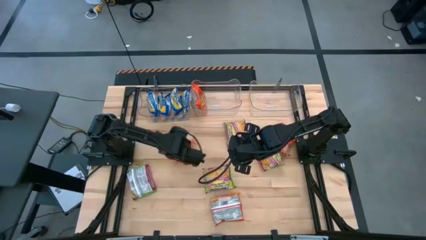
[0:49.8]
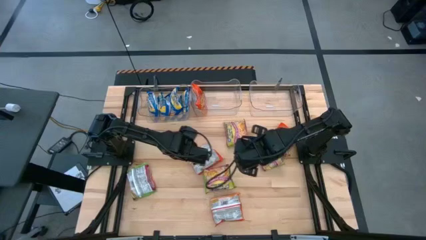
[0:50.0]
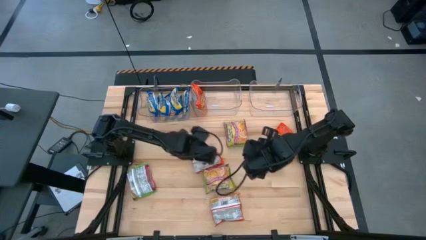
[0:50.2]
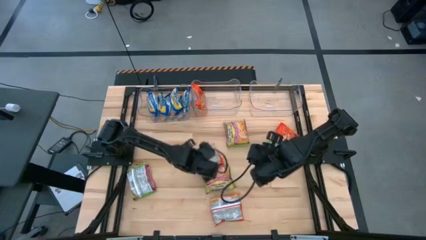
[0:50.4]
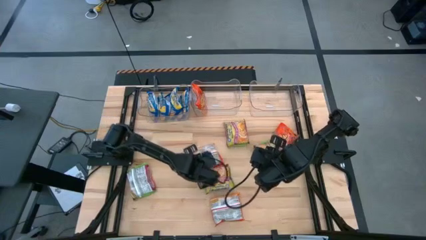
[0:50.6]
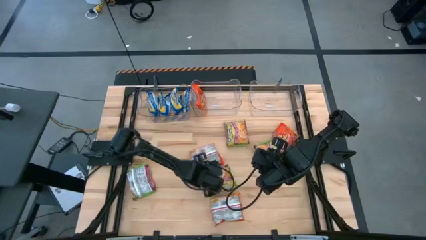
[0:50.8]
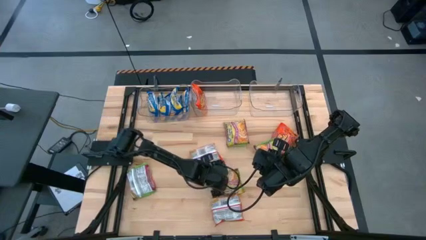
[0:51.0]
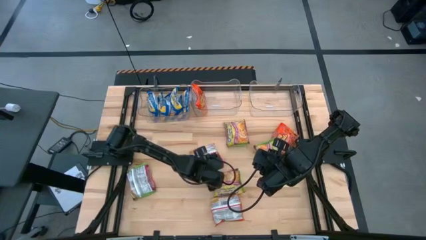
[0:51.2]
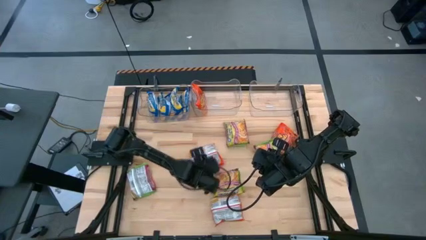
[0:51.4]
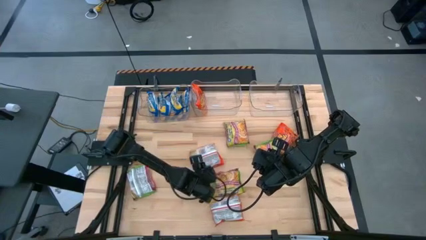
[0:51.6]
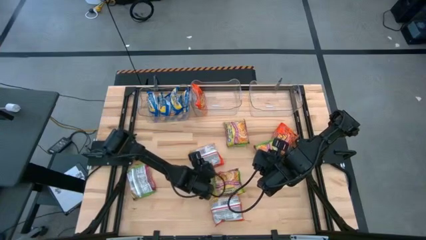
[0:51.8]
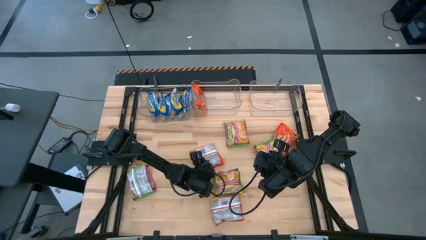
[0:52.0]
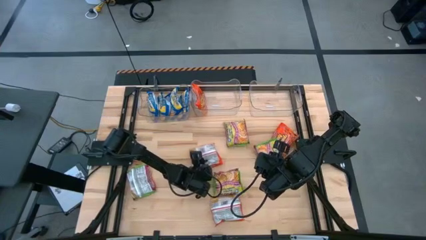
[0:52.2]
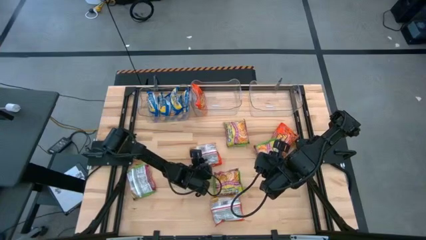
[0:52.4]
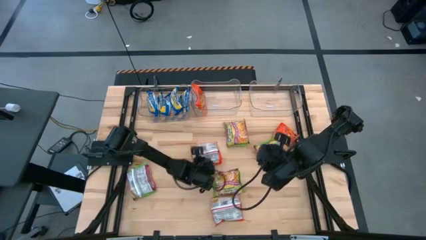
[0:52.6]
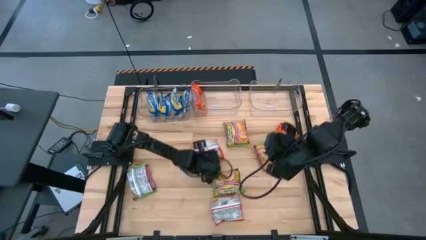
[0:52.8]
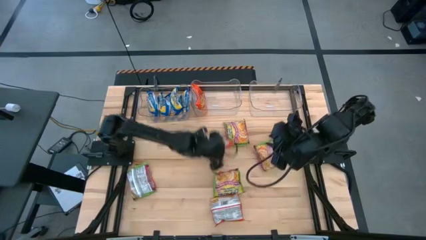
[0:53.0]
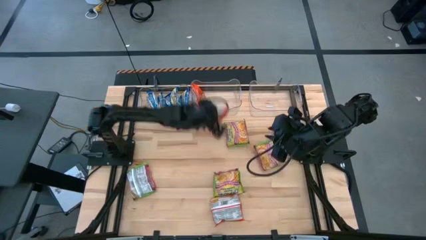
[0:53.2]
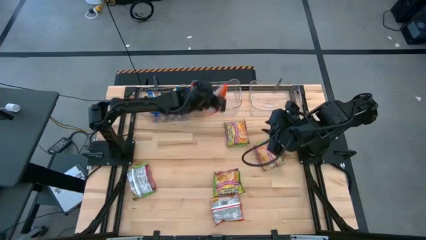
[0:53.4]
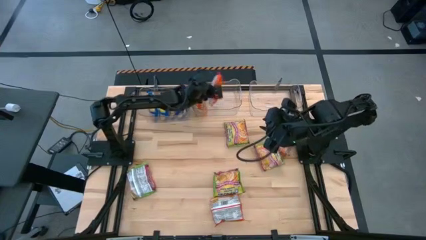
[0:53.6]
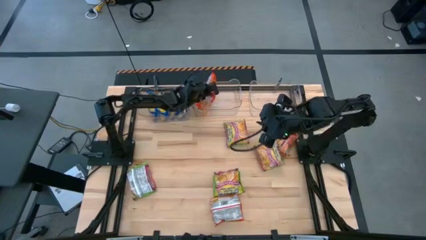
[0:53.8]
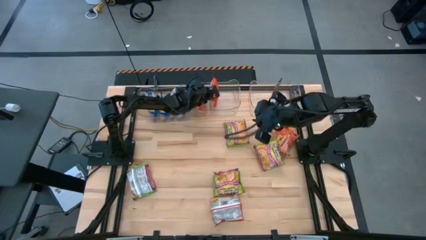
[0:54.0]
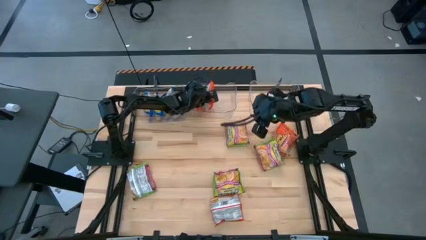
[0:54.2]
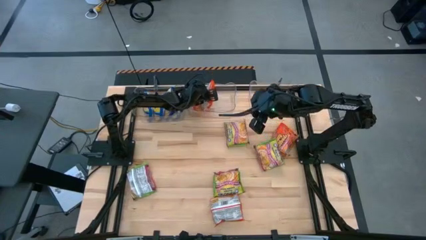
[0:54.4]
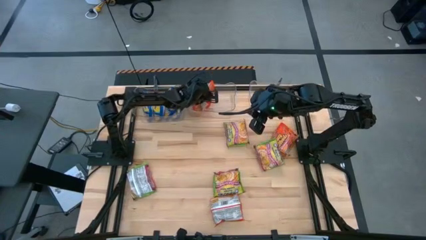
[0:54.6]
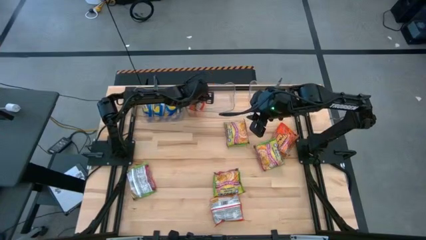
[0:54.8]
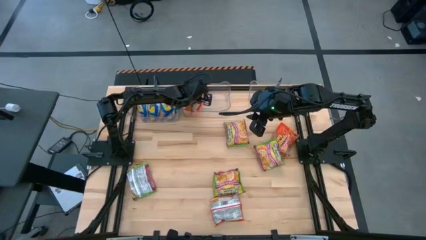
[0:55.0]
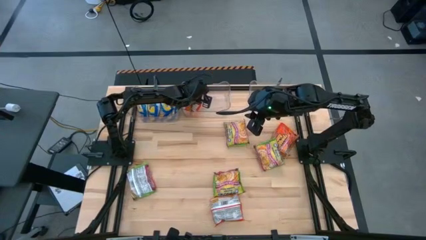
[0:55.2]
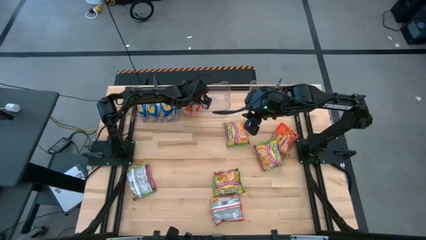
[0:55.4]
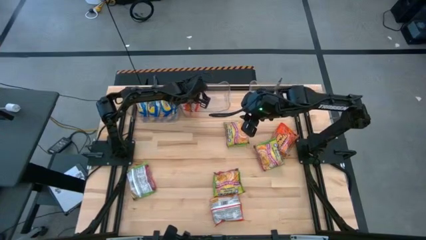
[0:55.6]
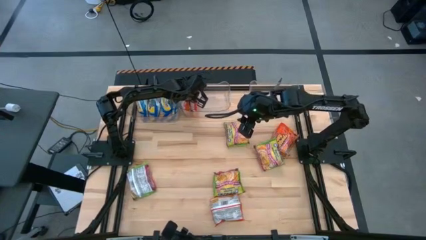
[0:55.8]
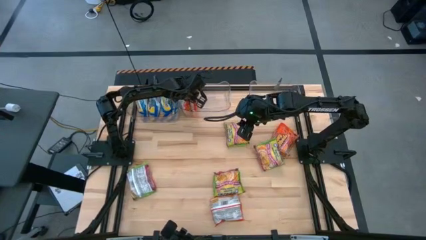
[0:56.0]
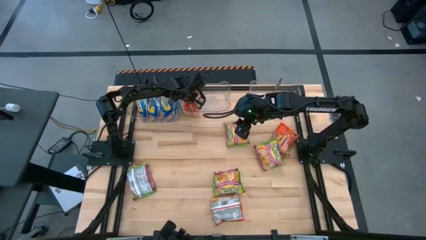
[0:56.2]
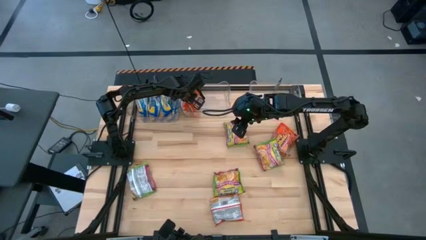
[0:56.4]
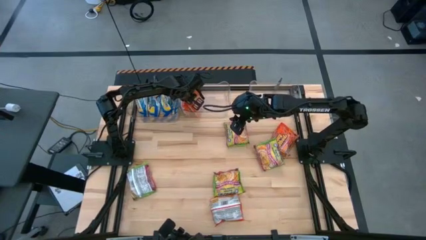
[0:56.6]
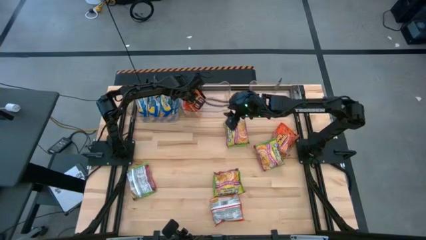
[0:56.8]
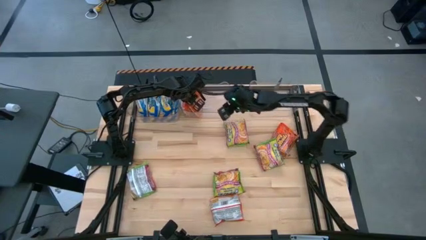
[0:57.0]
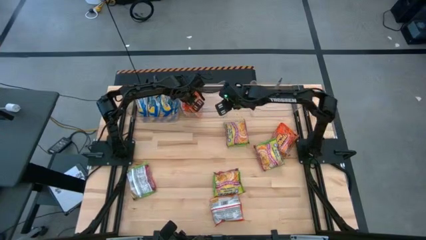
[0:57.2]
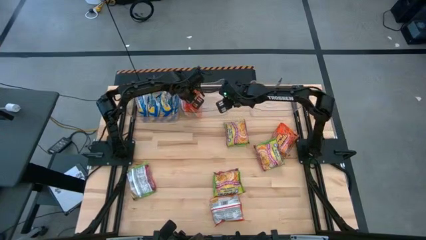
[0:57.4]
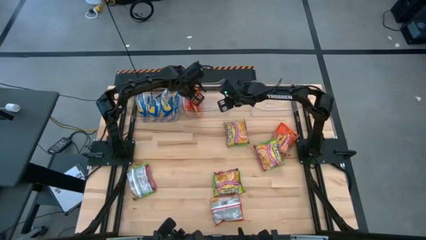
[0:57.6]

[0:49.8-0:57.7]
Task: Sort Maruchan noodles
Put the orange noodle pack into the middle transparent bin

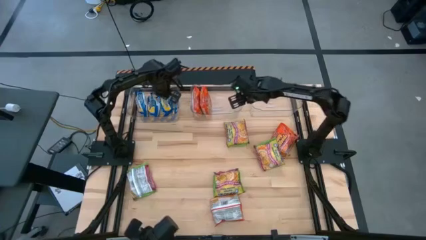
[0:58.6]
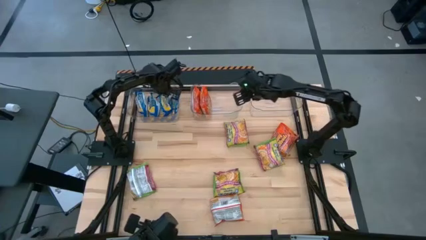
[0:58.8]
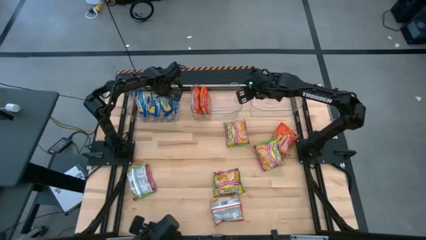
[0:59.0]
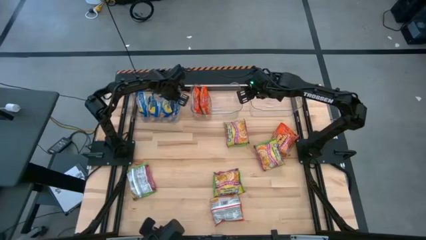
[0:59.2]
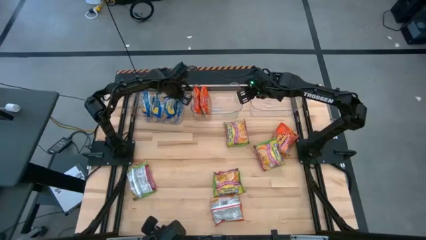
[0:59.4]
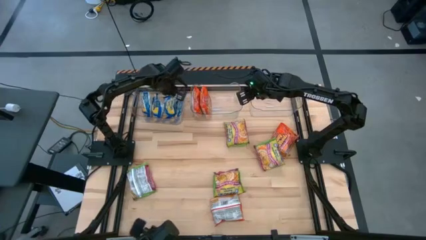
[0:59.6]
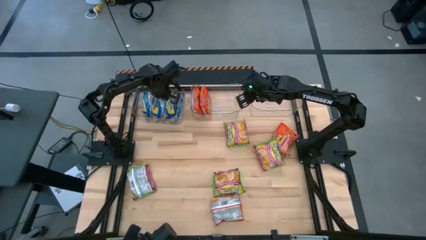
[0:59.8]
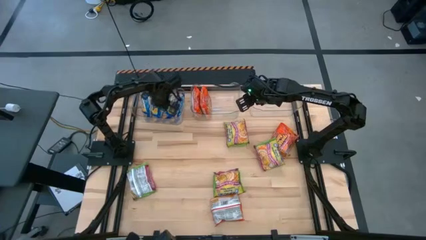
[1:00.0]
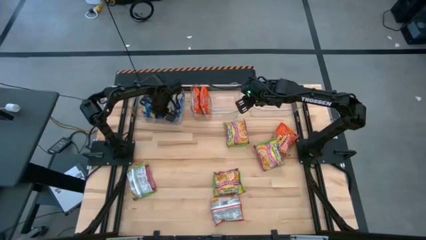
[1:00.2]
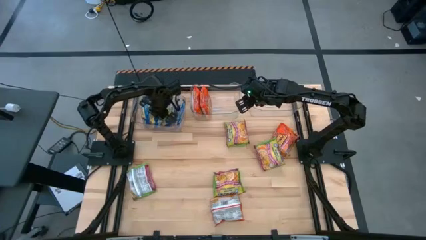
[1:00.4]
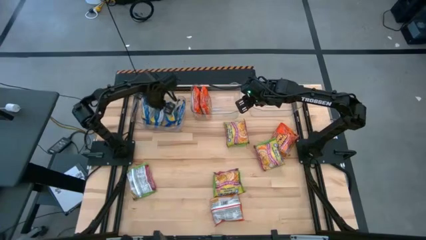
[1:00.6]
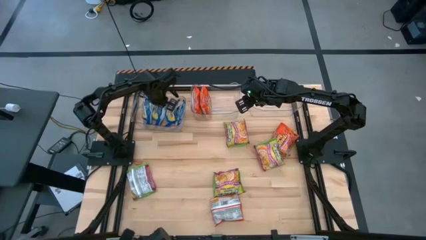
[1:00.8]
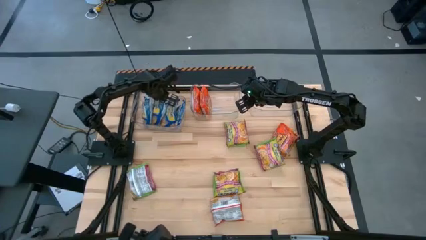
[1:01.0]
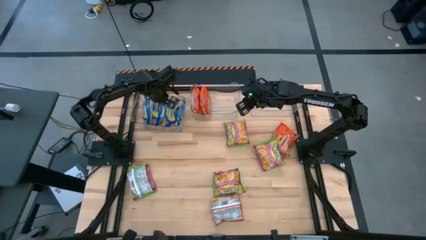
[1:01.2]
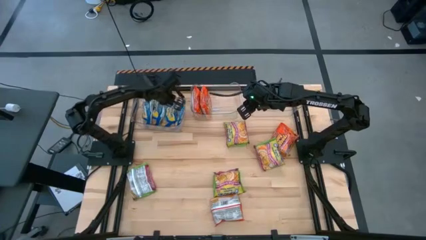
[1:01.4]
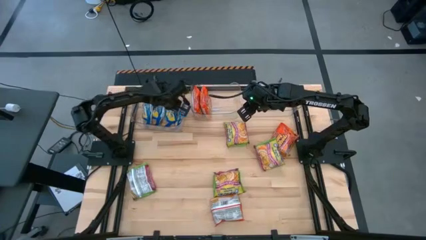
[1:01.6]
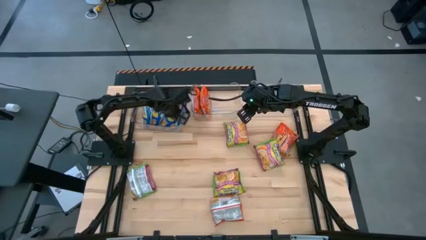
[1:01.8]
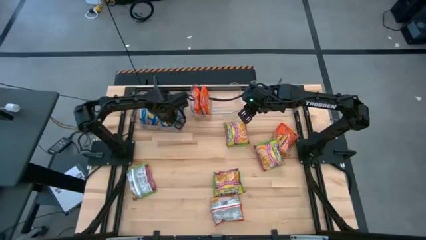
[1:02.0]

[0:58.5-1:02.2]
Adjust the blue noodle packs into the left transparent bin

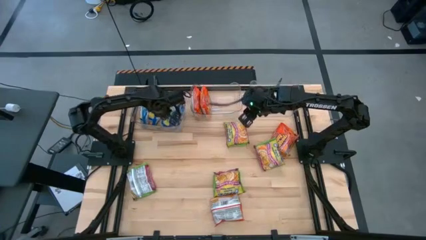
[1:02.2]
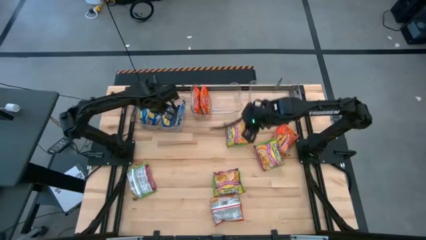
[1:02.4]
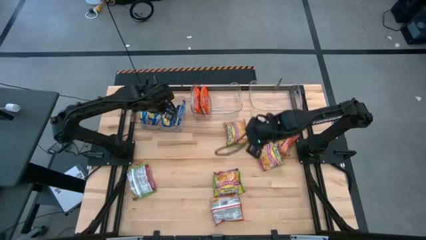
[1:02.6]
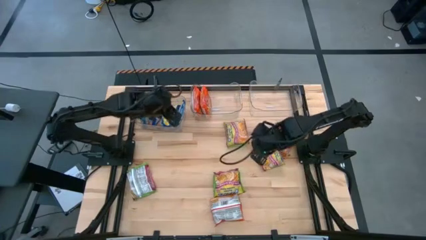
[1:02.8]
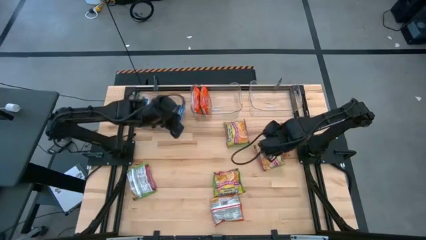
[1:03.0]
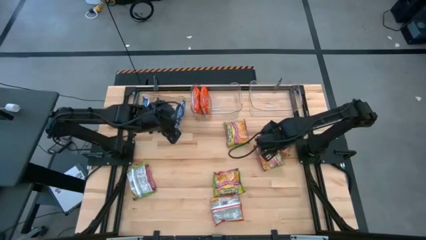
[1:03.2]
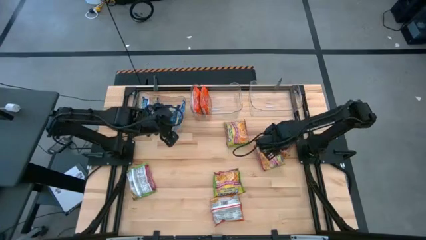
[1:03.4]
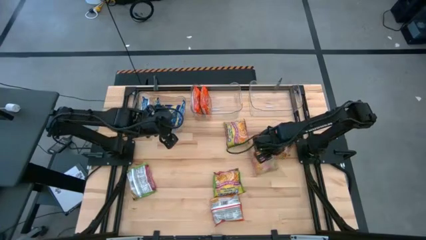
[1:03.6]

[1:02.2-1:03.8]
Adjust the green noodle pack

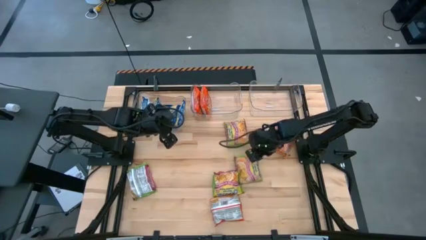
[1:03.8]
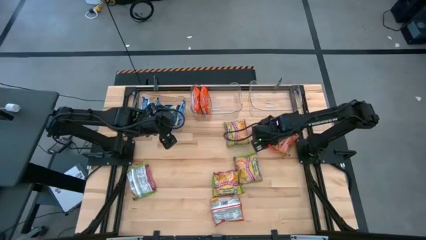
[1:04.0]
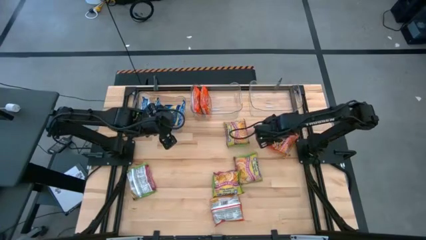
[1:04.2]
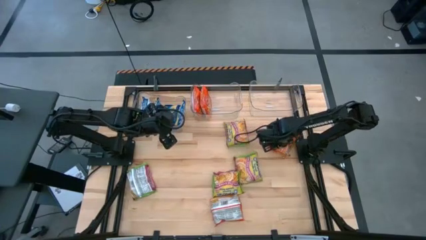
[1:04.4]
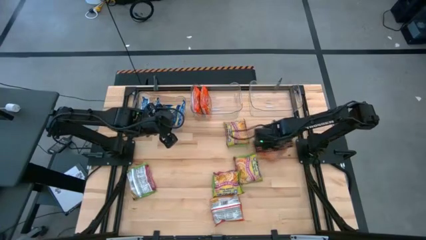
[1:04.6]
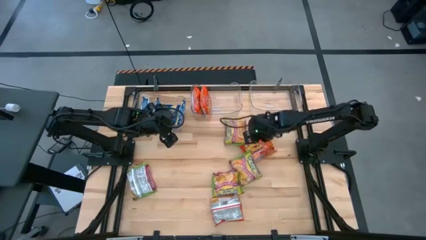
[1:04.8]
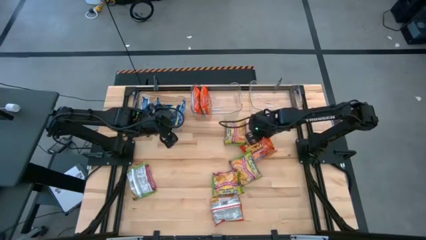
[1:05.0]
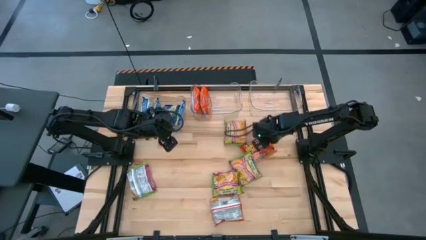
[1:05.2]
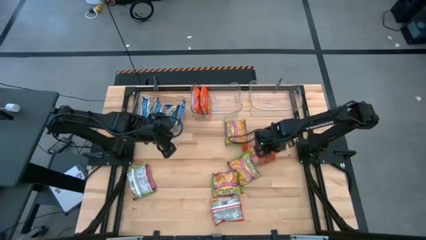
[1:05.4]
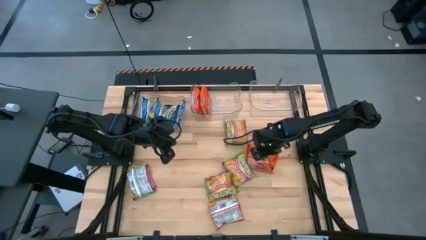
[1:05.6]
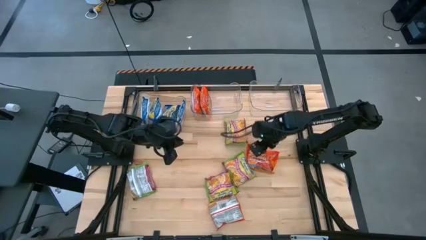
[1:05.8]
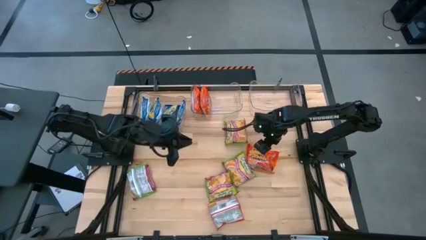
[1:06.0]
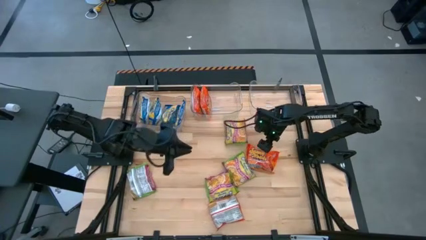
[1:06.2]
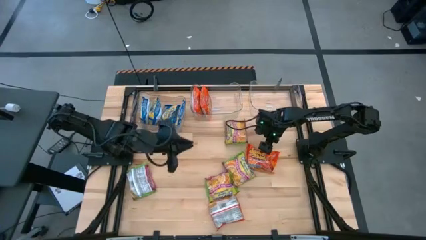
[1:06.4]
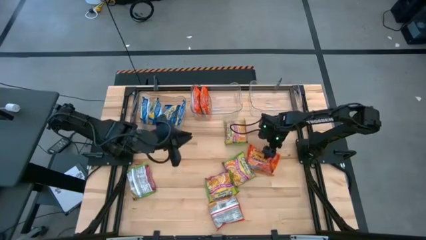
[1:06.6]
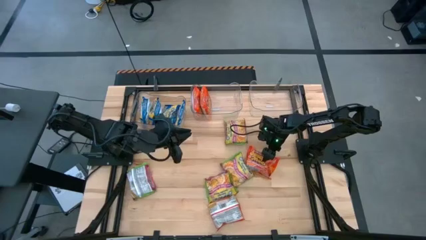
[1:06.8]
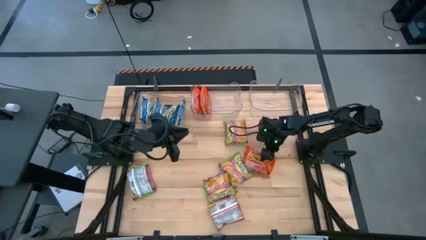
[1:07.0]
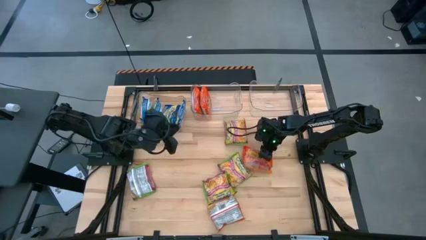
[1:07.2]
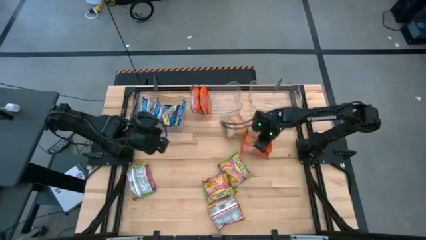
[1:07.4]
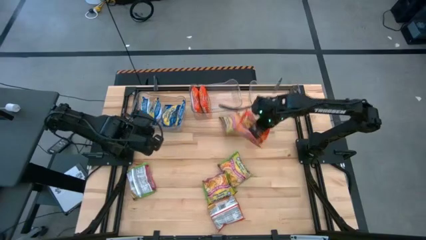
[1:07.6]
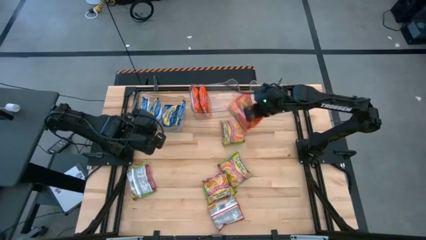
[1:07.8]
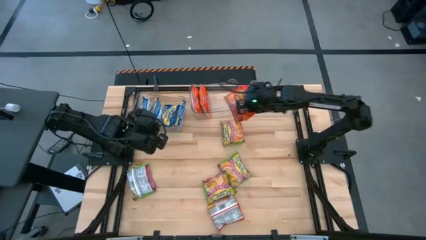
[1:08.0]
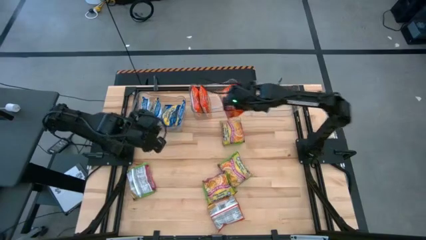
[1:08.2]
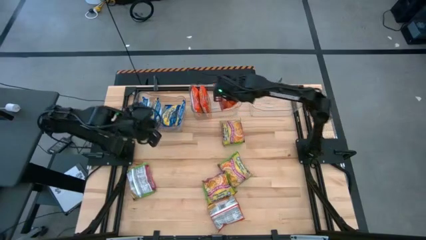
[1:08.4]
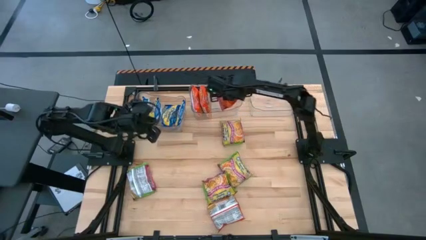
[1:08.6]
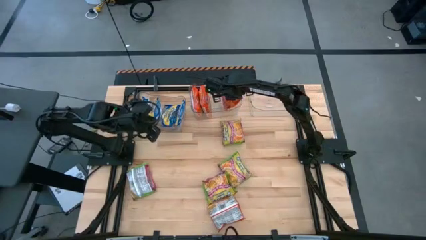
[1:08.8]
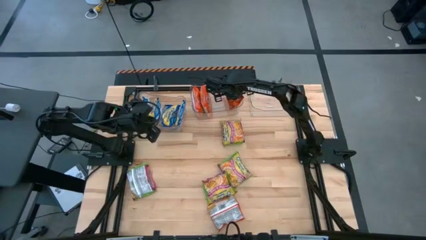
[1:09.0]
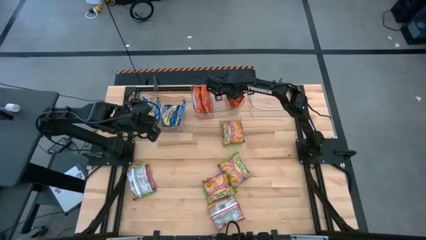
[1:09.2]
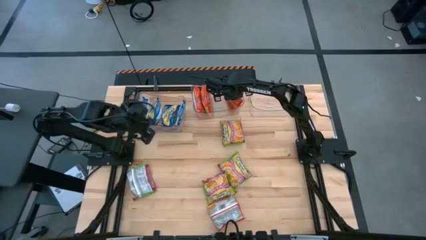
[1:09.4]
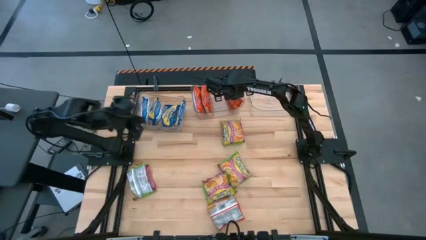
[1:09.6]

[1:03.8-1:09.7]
Put the orange noodle pack into the middle transparent bin
